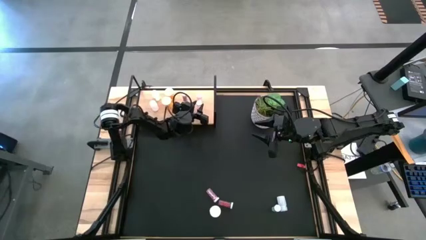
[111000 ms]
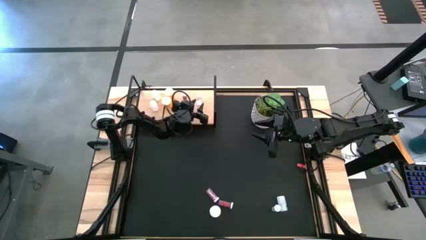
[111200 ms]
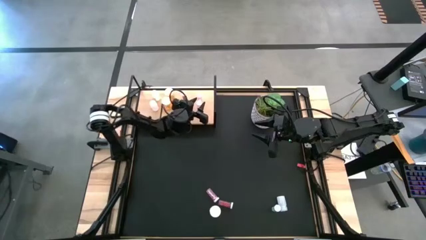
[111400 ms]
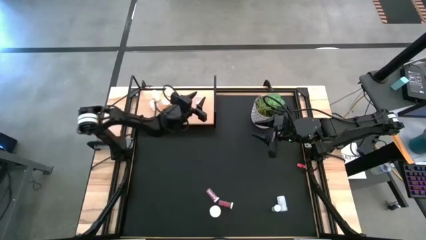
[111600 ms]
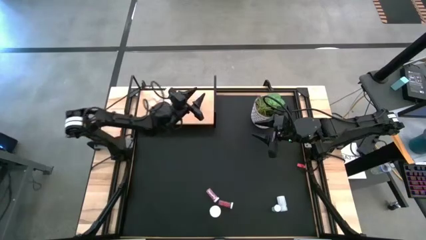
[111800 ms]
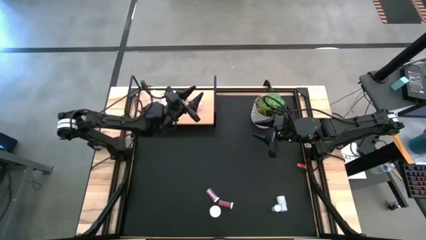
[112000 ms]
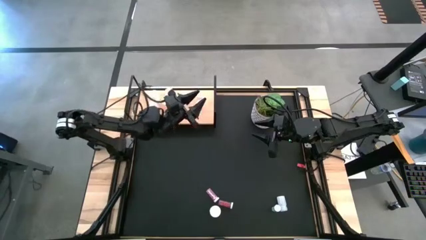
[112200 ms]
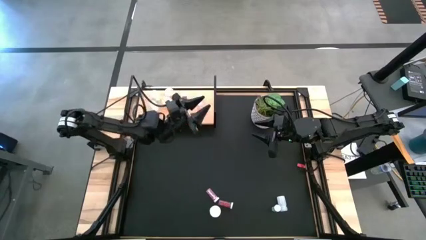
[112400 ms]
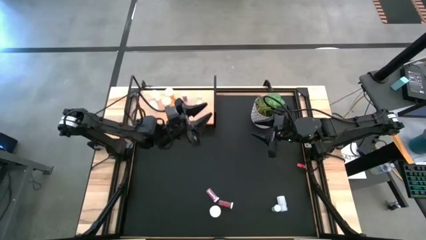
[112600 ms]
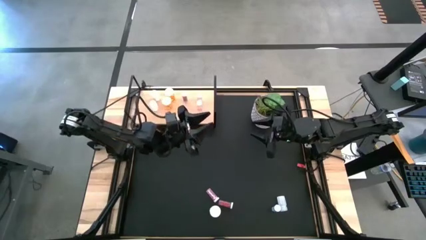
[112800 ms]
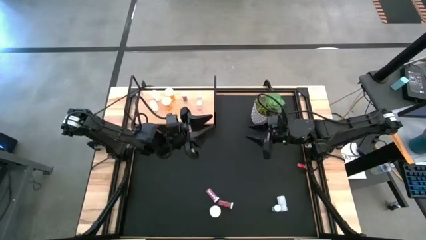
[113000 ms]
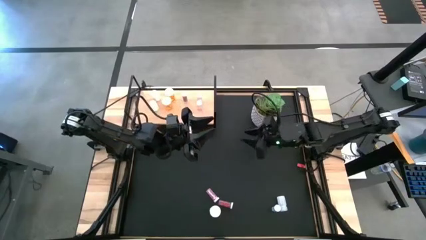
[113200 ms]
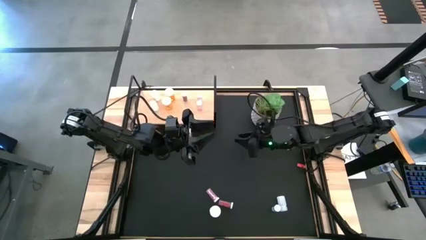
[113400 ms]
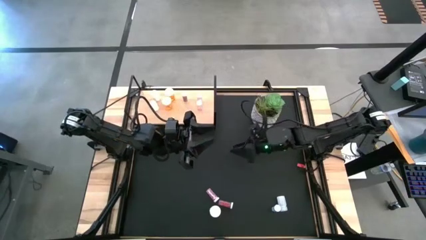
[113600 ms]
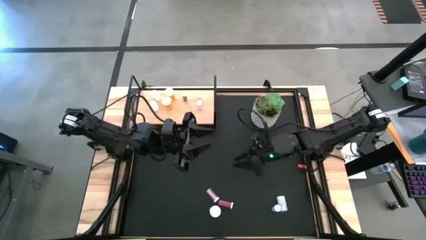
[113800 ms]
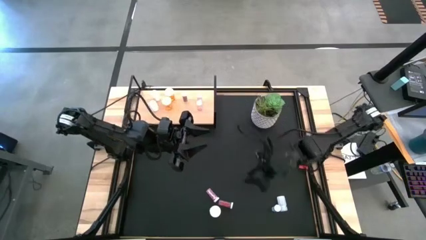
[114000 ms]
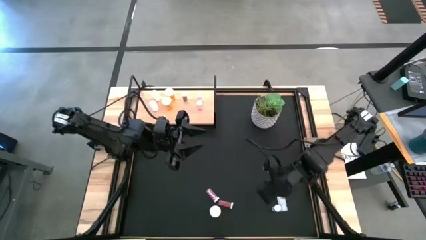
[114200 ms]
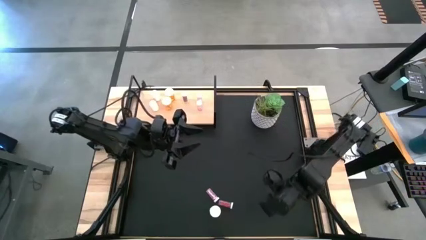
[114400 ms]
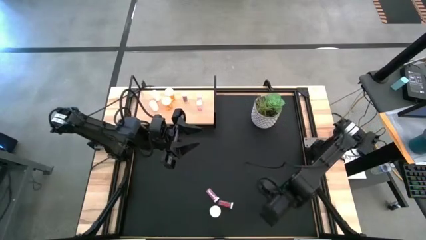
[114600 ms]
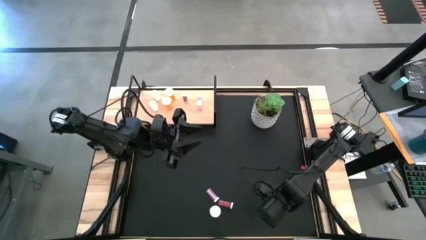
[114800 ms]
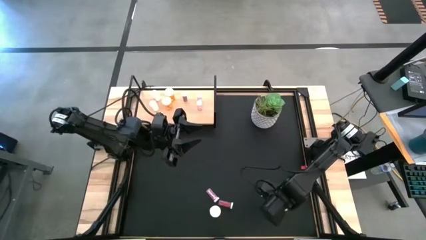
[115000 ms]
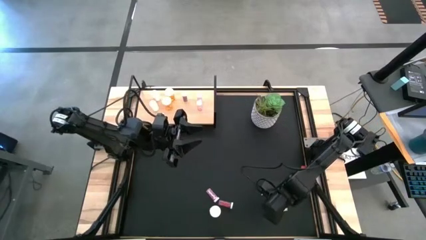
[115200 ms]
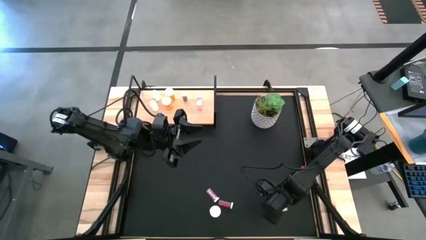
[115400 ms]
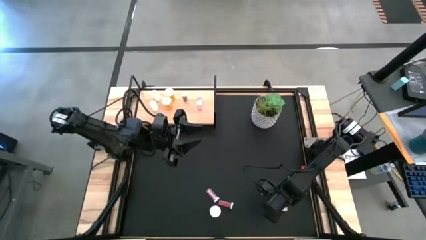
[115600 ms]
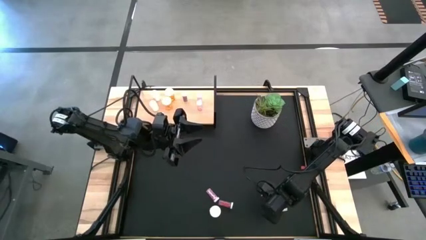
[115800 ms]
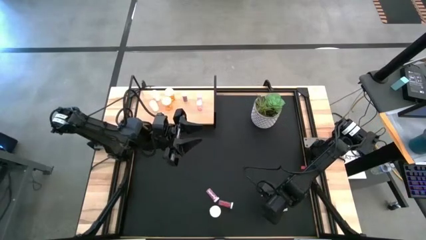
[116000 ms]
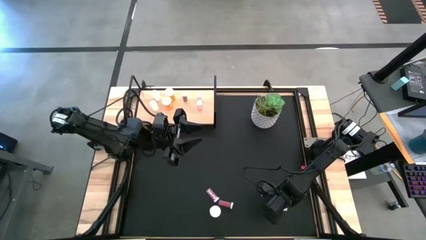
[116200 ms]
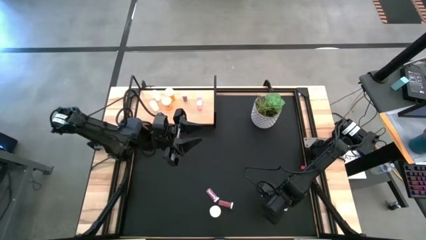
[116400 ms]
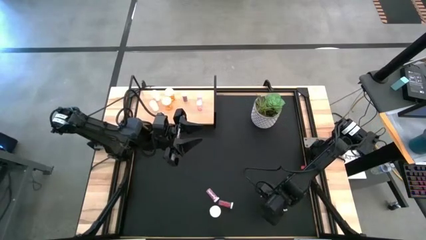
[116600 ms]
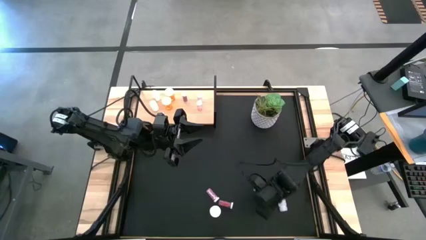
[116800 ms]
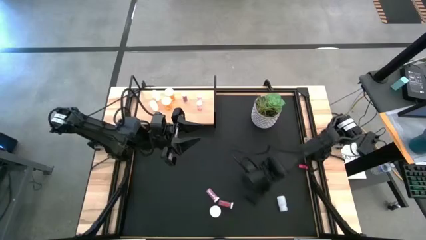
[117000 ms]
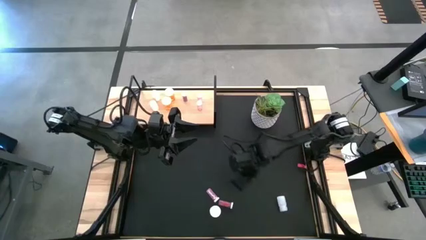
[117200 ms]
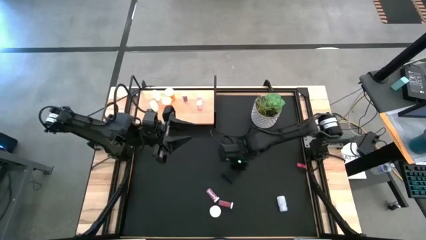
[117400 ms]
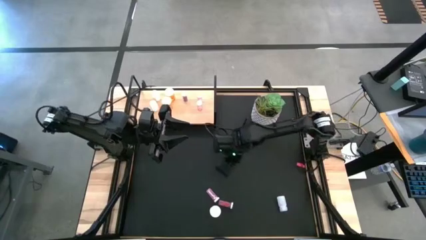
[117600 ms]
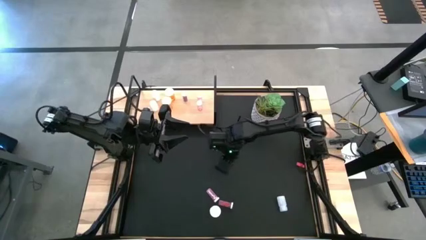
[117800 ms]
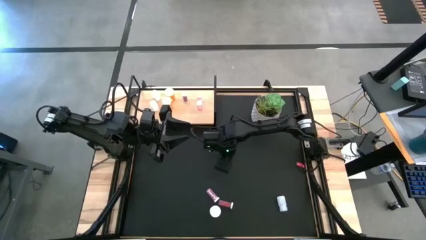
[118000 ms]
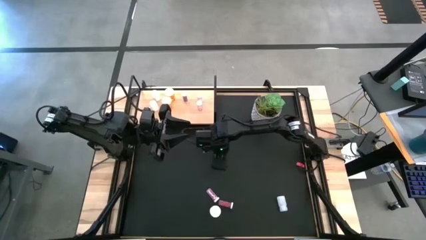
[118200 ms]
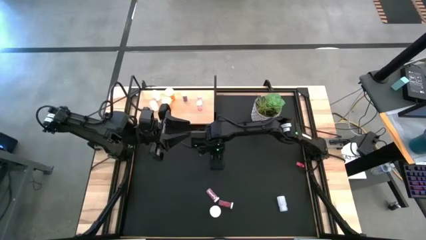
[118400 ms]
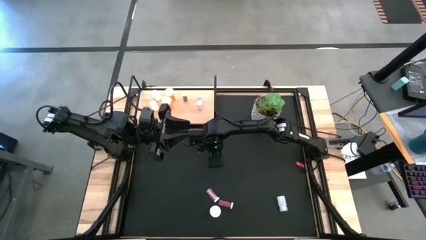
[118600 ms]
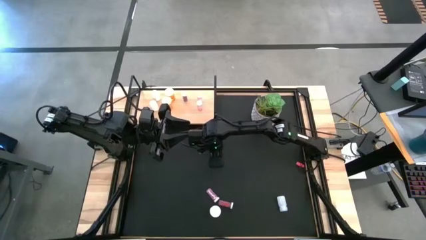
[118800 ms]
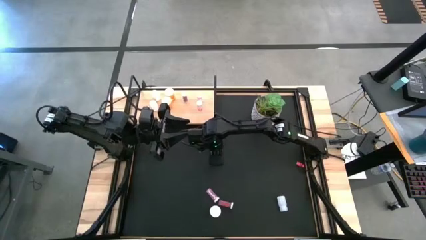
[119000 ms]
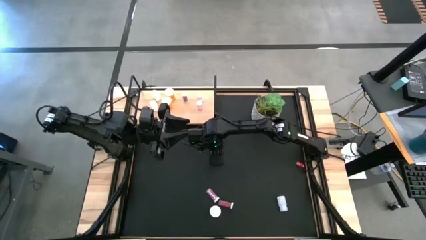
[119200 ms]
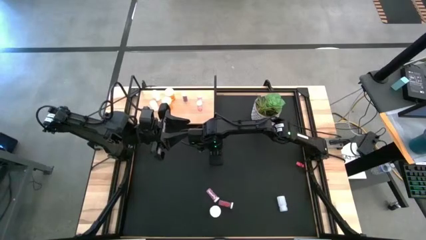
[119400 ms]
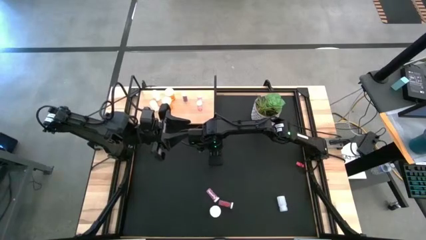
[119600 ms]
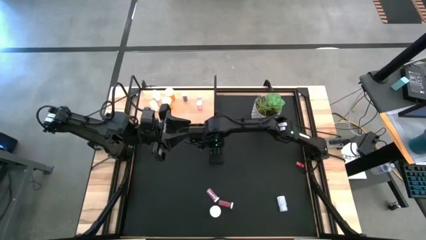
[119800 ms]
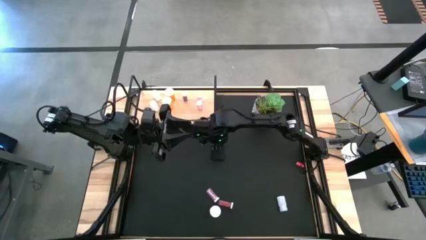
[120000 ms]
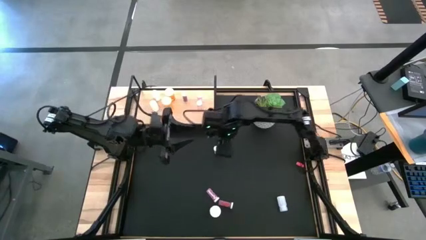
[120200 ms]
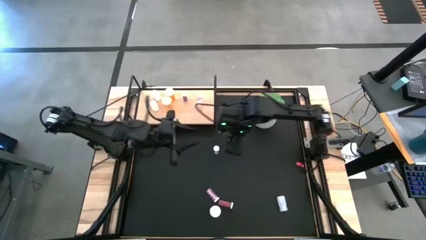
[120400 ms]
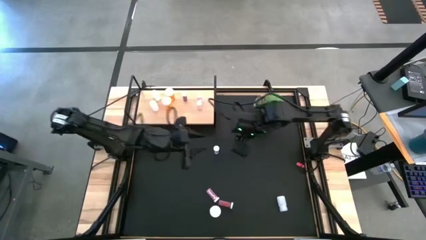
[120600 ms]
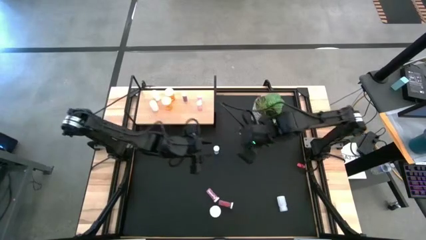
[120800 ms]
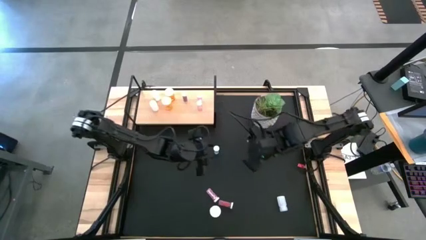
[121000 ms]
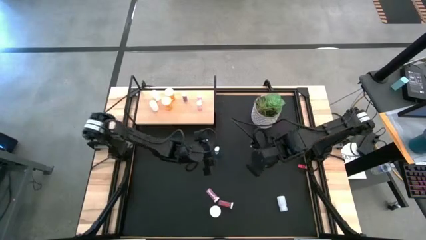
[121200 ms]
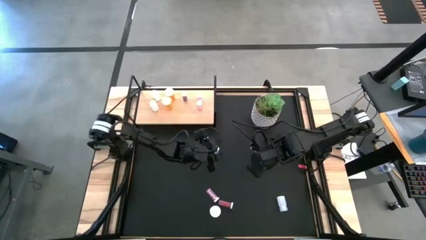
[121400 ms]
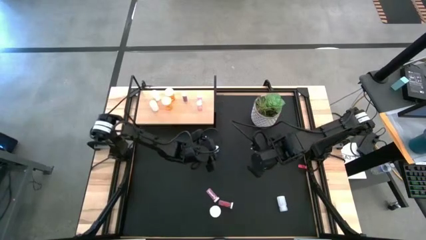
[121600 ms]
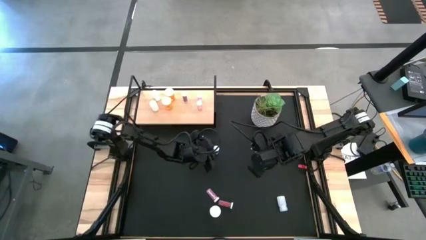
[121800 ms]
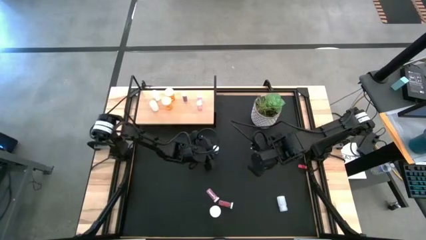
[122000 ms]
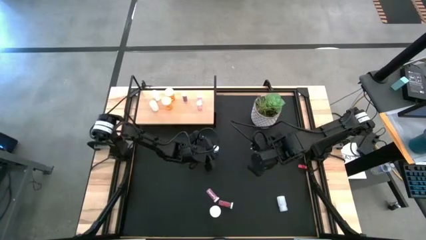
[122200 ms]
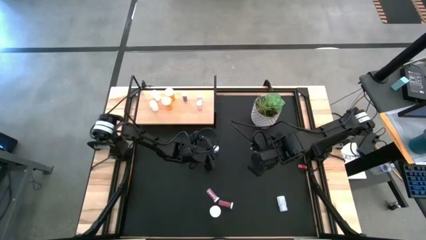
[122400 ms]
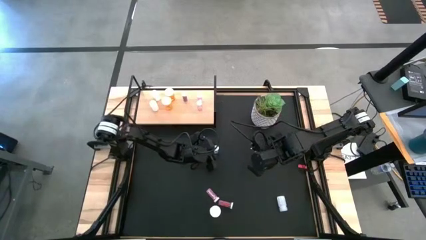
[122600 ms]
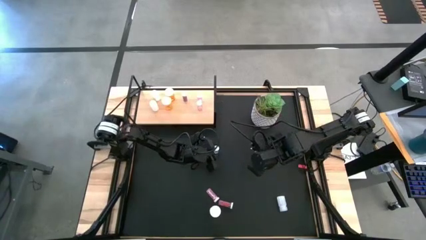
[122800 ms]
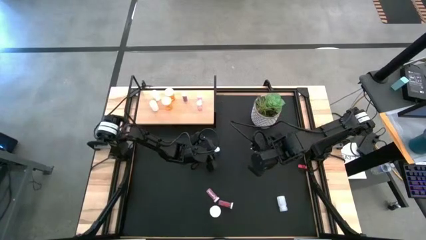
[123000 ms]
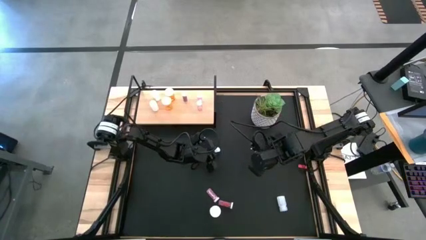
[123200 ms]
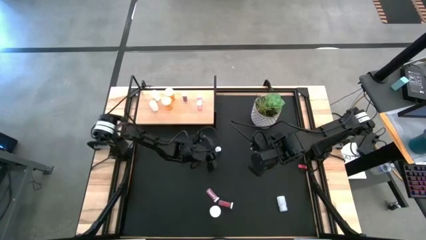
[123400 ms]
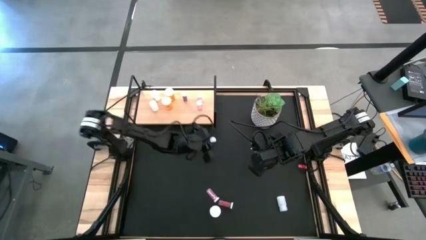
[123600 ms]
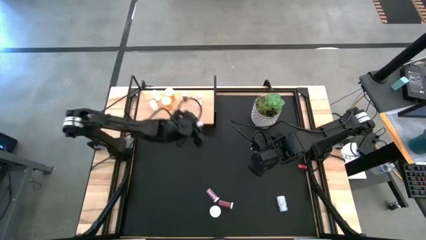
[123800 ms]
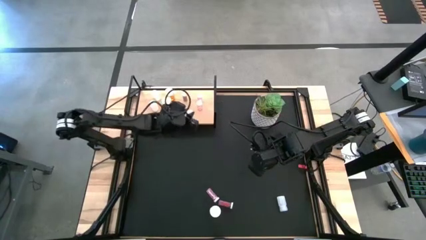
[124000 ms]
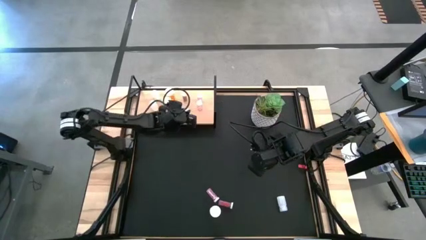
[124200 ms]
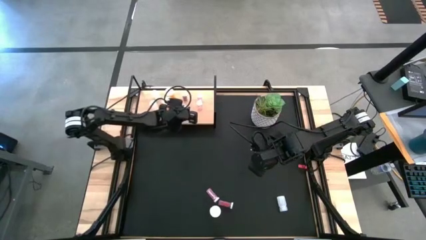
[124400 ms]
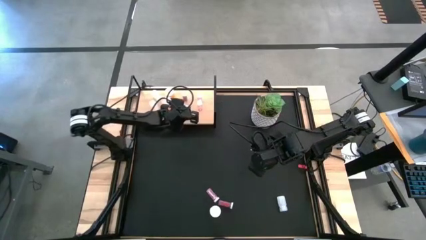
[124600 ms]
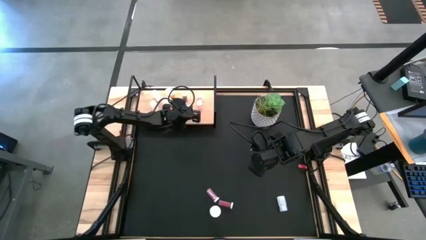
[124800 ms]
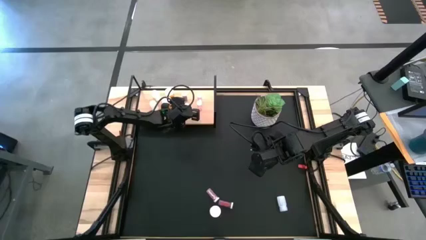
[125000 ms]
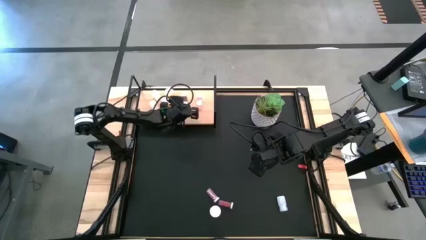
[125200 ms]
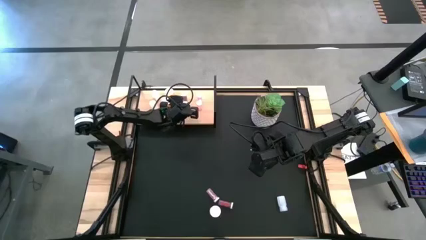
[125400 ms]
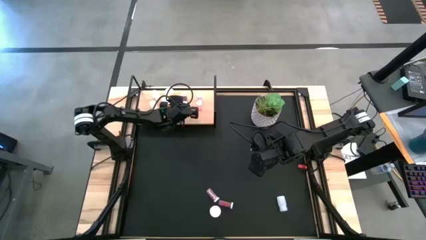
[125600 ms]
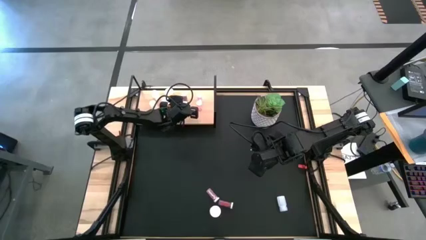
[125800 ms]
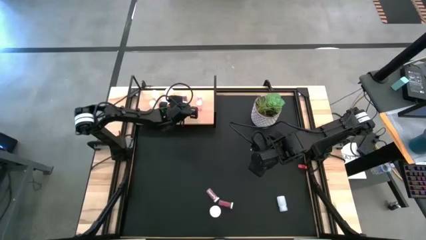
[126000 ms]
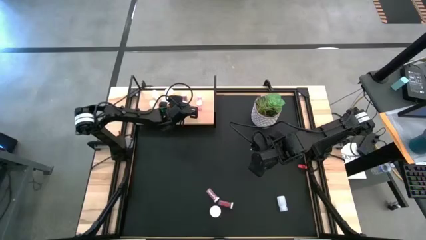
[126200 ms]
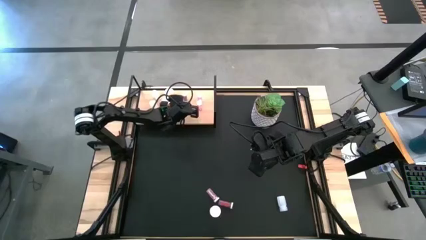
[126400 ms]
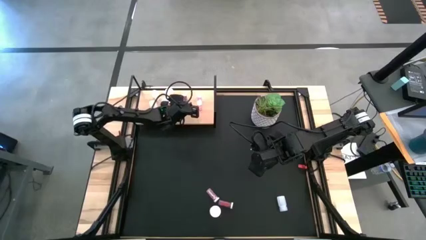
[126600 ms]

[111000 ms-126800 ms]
Task: Pick and place medicine bottles onto shelf by color
Put the right blue pill bottle on the shelf aligned with the other blue pill bottle

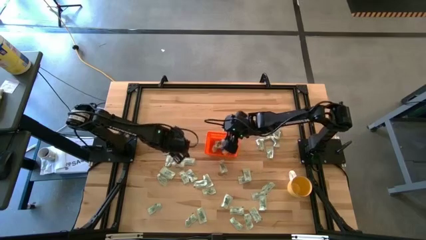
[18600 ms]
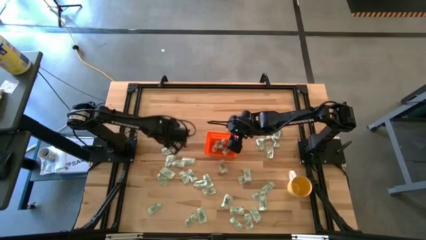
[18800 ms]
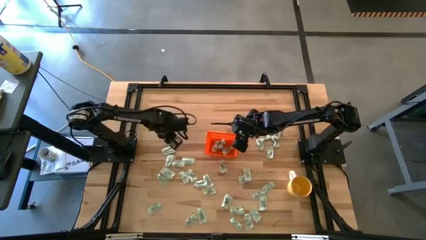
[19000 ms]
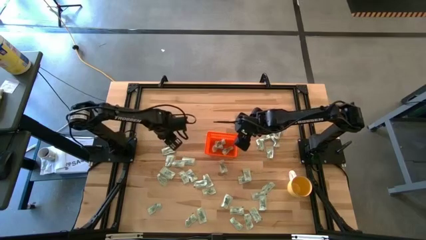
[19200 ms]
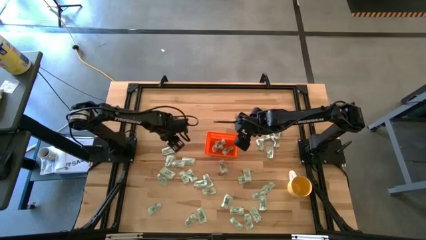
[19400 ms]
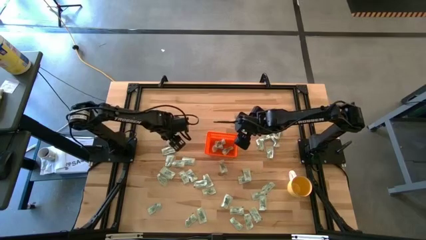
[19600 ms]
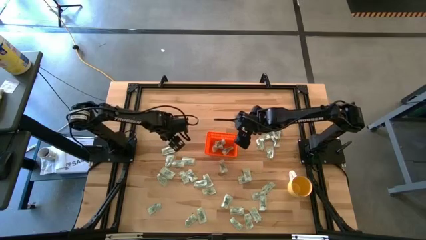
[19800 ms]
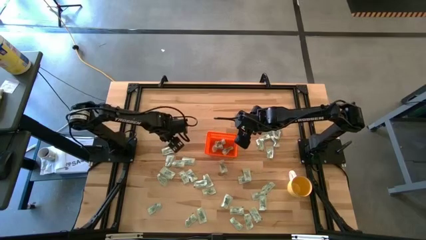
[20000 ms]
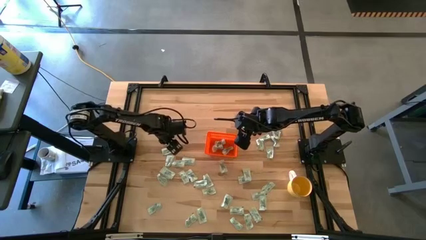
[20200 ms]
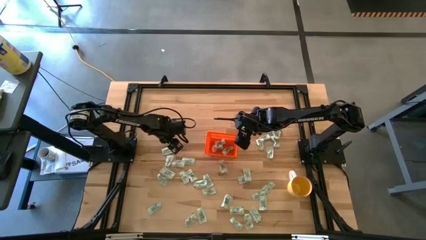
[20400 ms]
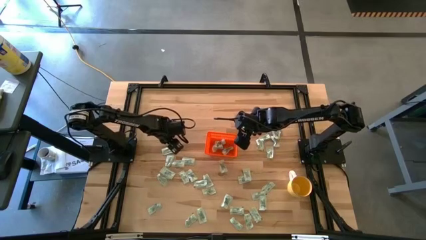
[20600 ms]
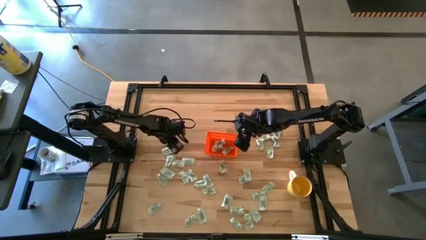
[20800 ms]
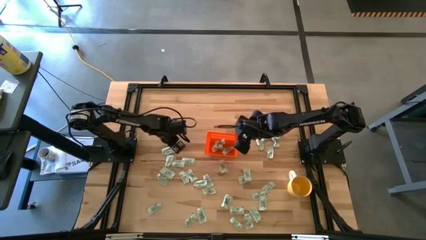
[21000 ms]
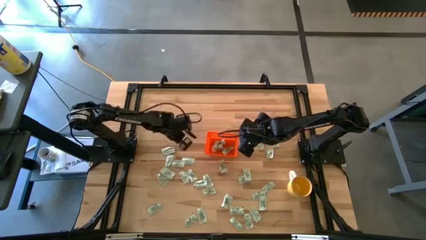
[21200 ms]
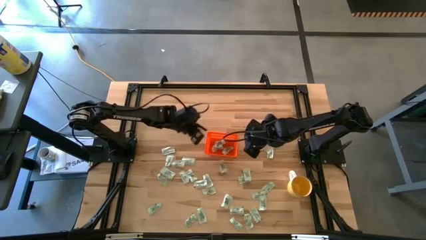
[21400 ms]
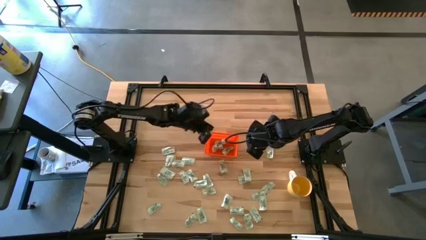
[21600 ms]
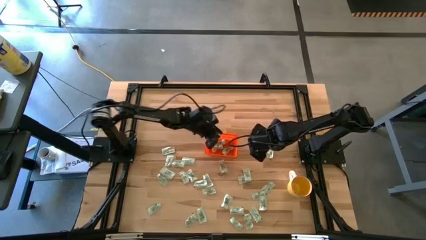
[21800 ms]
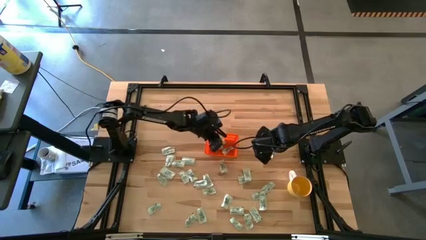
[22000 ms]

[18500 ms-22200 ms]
Task: Pick and place Stevia / Truvia into bins
Put the light green stevia packet into the orange bin
